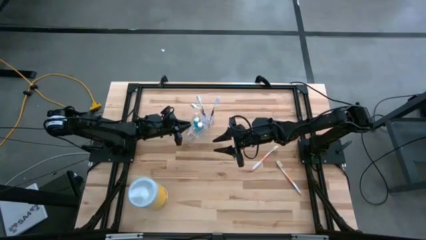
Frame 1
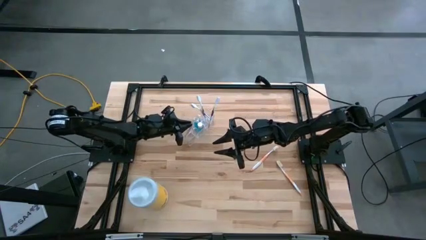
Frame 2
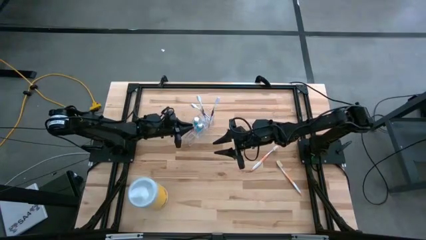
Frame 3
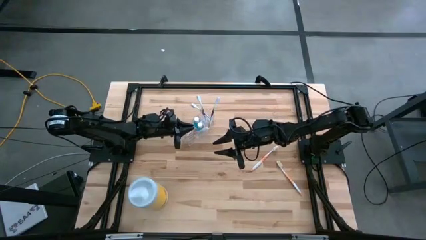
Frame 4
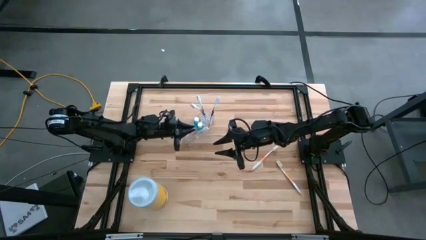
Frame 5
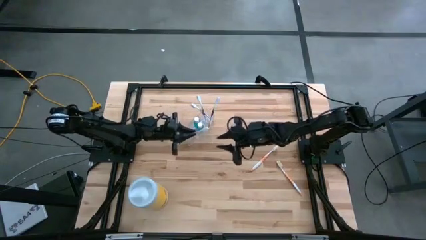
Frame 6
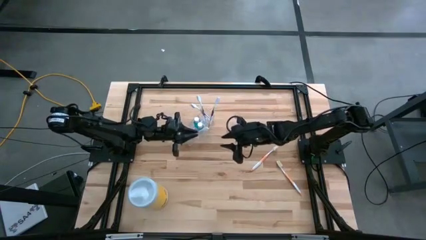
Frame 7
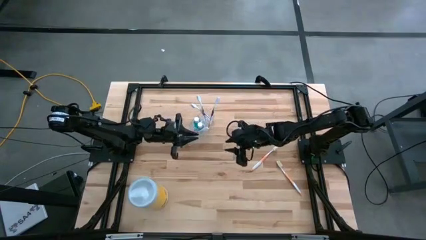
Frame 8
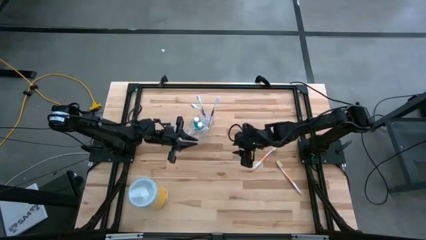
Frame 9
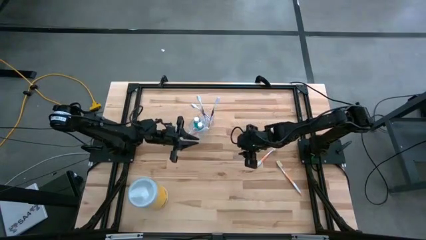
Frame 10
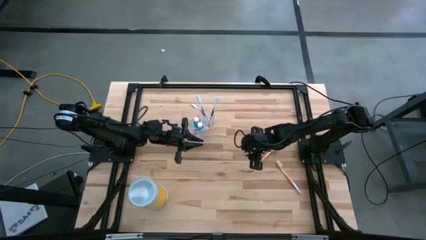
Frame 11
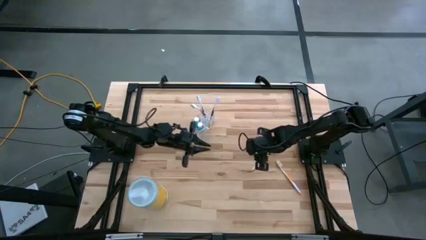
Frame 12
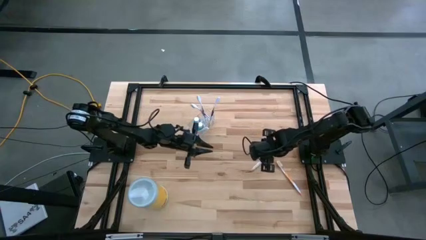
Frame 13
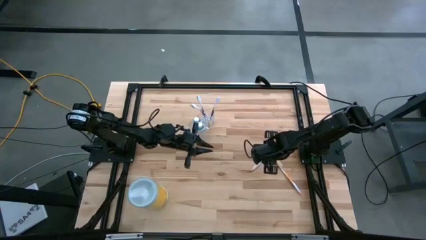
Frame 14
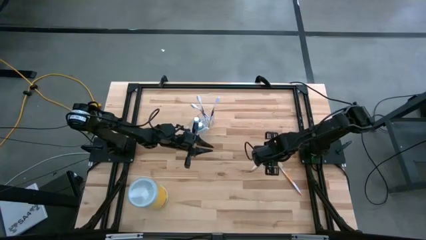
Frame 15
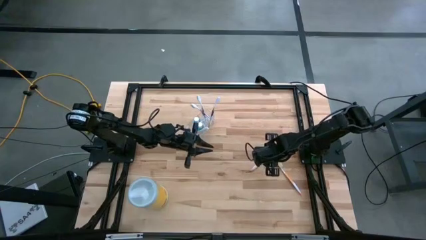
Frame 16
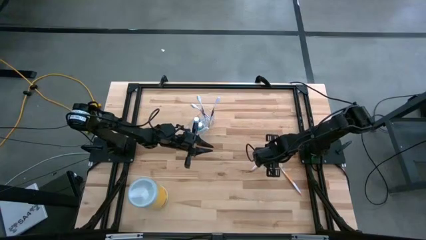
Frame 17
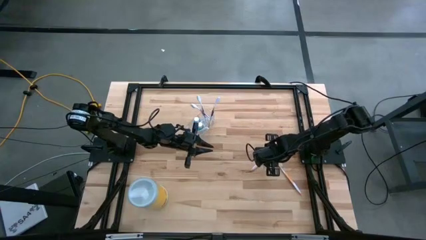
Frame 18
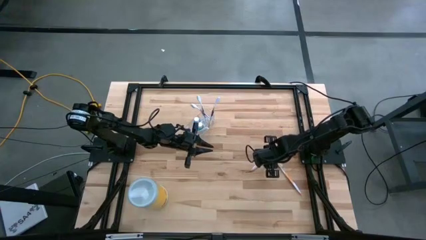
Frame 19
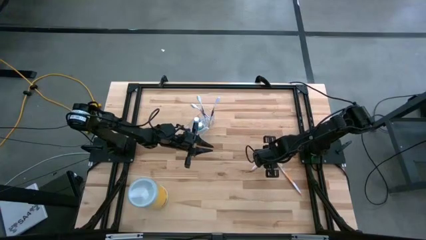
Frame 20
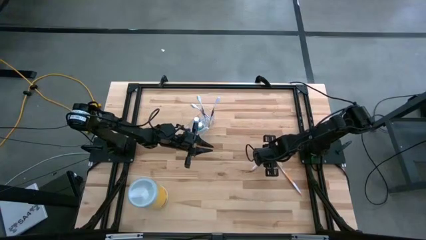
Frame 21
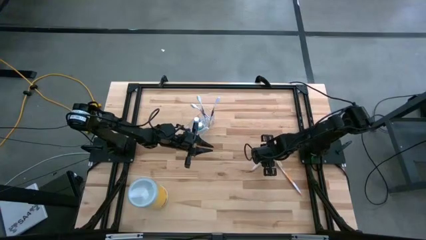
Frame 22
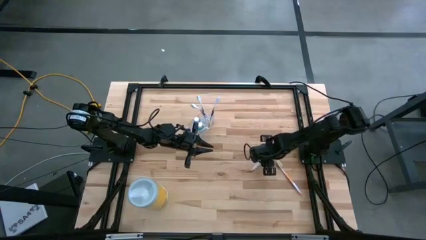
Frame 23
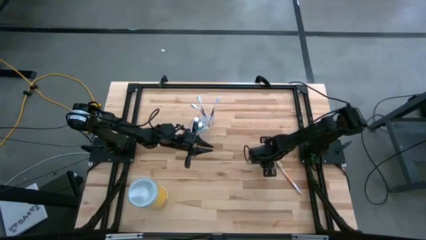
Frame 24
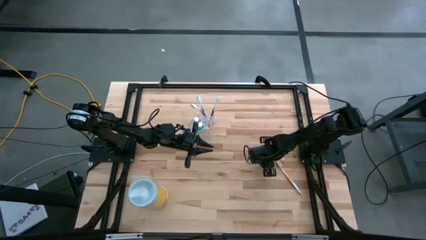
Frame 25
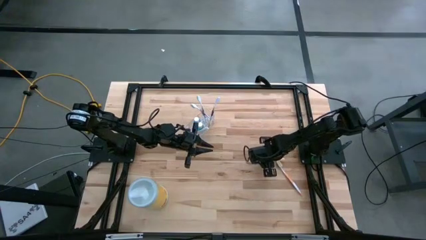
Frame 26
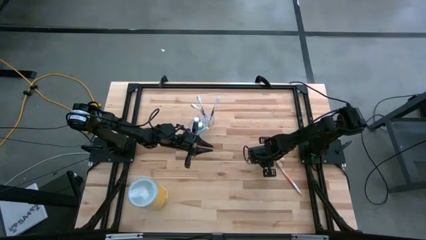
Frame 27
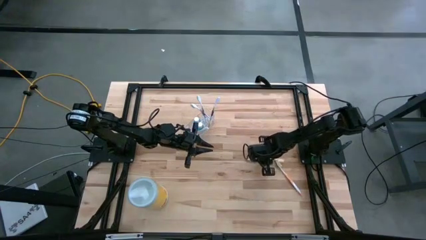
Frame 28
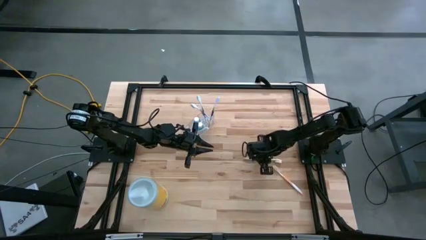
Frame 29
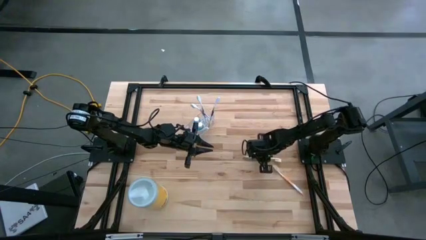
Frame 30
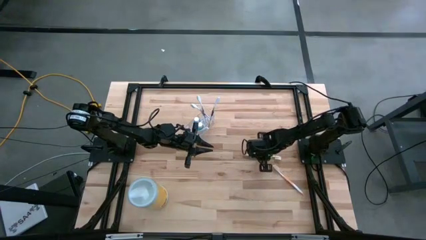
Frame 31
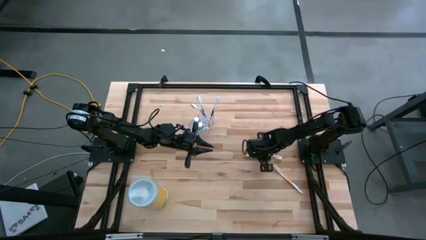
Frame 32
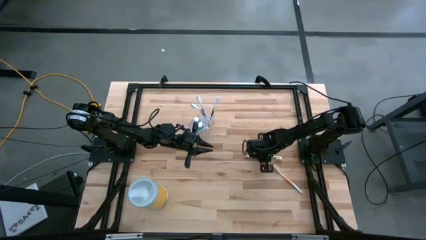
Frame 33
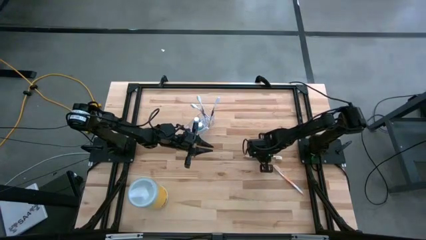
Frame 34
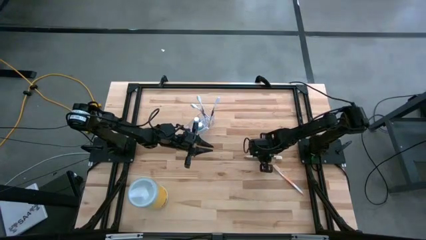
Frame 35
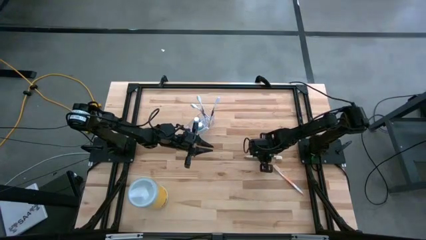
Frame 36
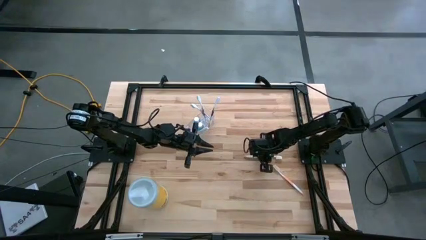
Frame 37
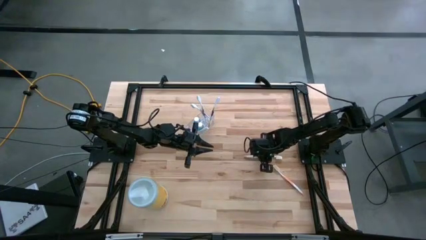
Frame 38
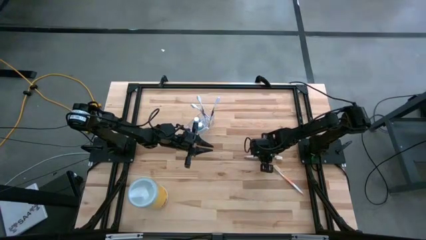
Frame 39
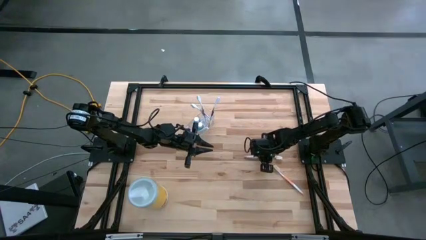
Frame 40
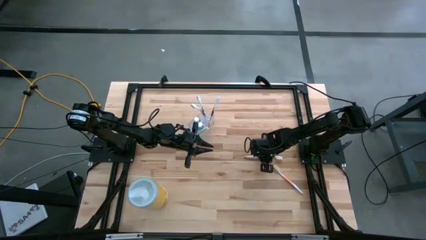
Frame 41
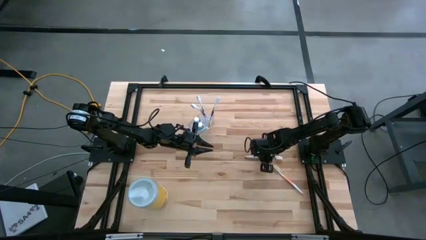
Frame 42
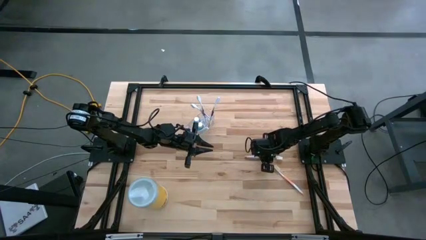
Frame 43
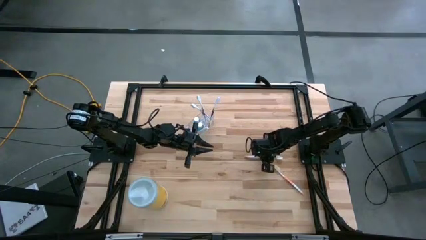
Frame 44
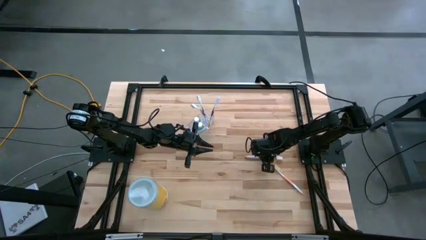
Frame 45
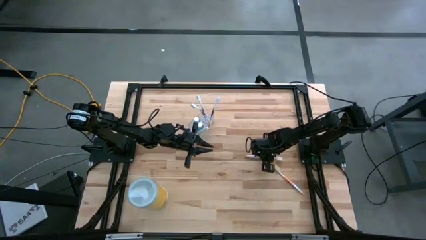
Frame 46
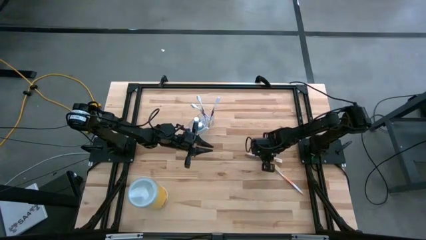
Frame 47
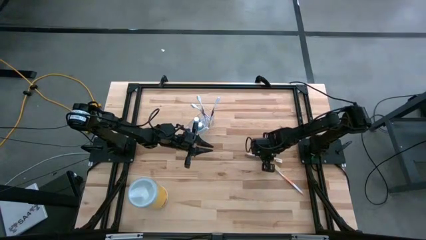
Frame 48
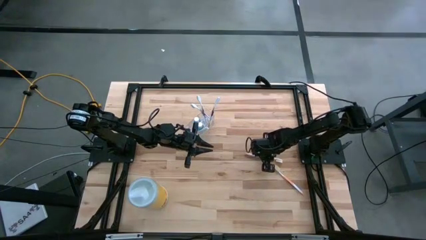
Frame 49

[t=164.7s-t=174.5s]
Task: Pick & Place toothbrushing station
Put the top orange toothbrush into the transparent organizer

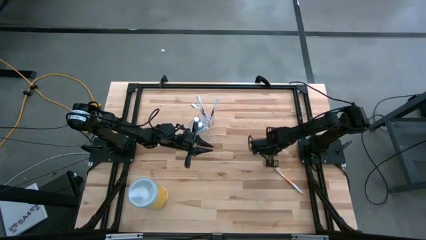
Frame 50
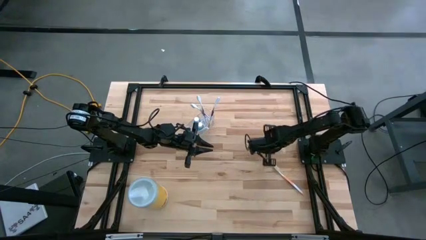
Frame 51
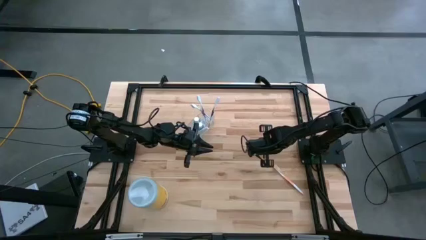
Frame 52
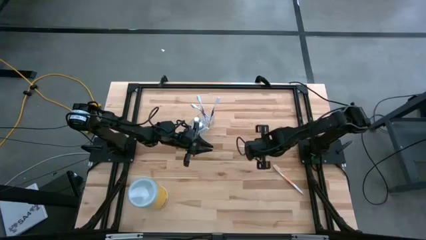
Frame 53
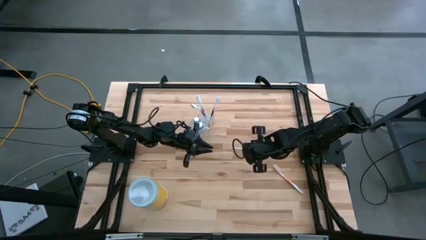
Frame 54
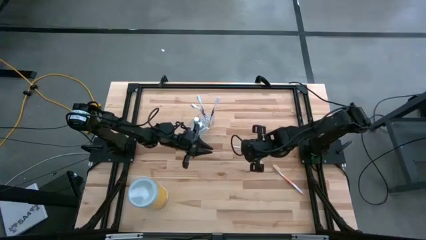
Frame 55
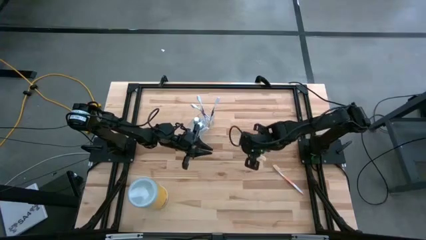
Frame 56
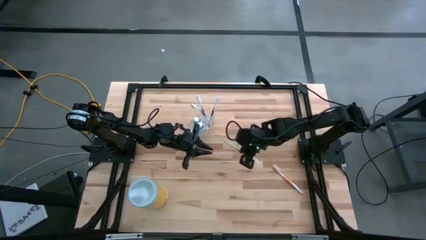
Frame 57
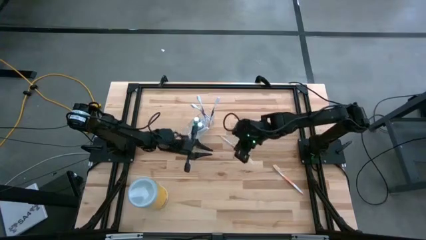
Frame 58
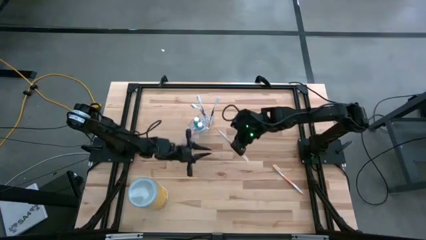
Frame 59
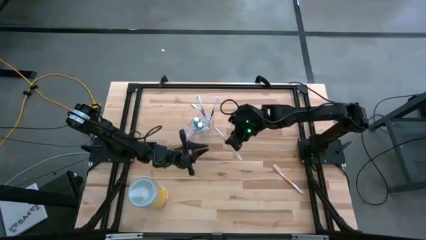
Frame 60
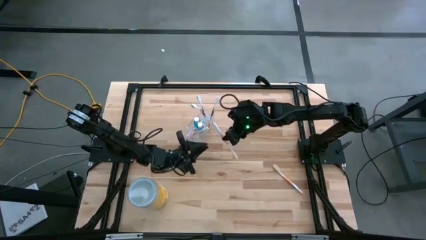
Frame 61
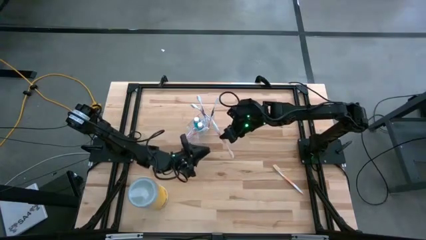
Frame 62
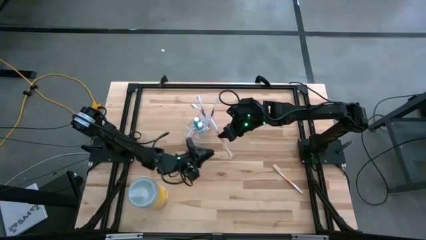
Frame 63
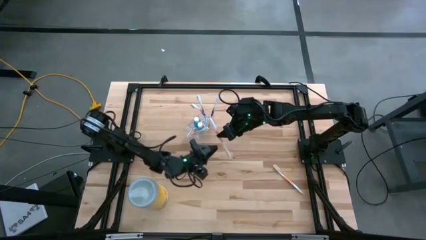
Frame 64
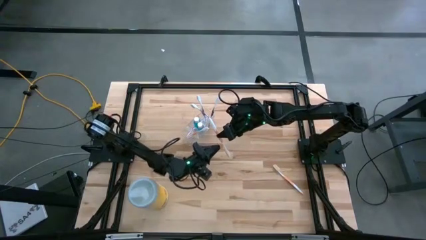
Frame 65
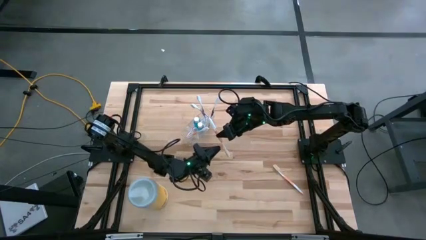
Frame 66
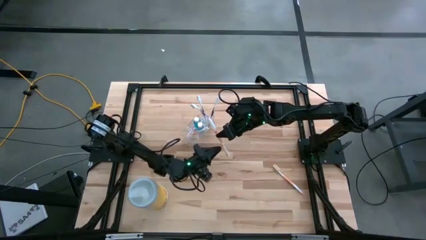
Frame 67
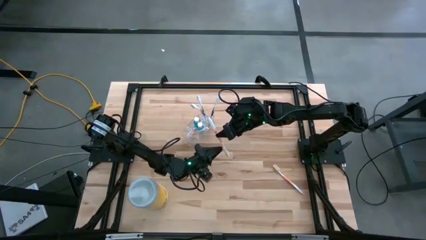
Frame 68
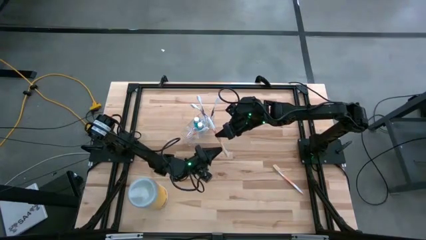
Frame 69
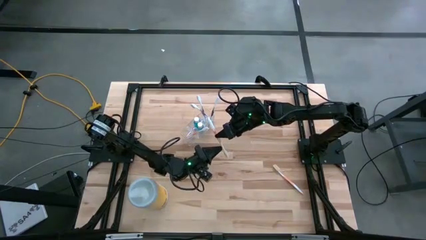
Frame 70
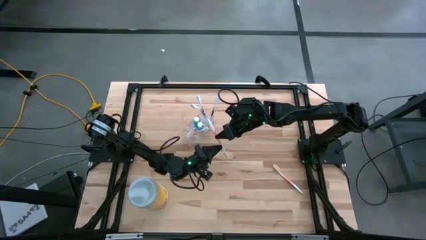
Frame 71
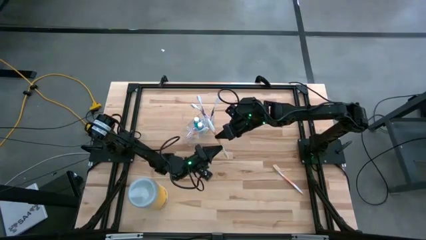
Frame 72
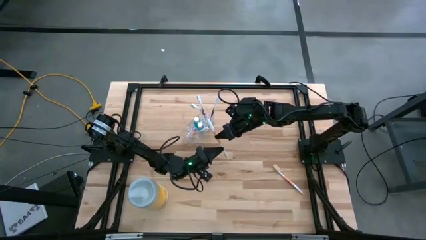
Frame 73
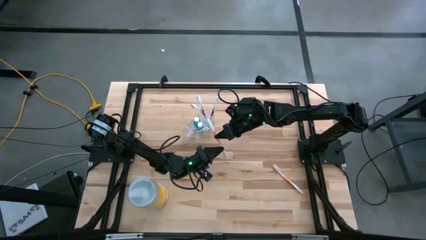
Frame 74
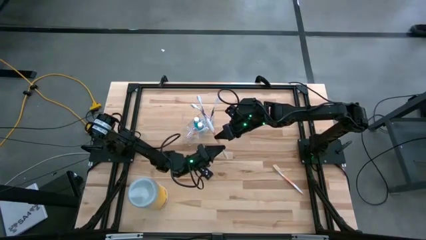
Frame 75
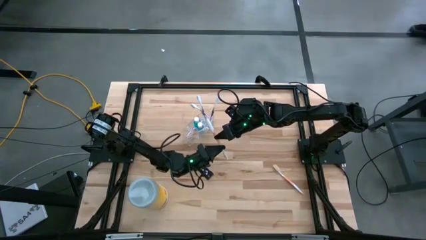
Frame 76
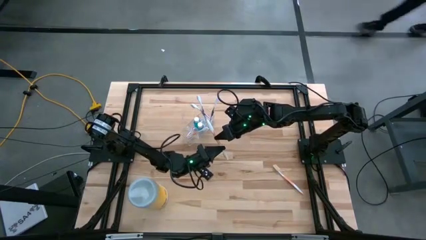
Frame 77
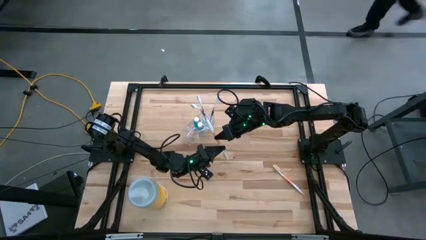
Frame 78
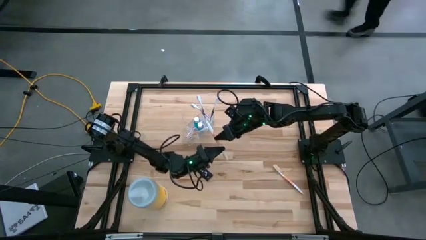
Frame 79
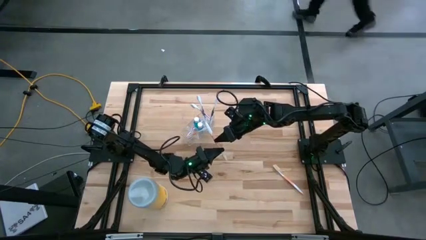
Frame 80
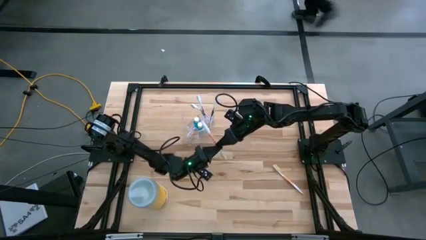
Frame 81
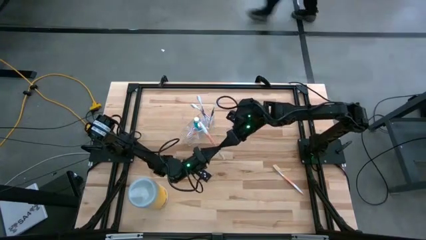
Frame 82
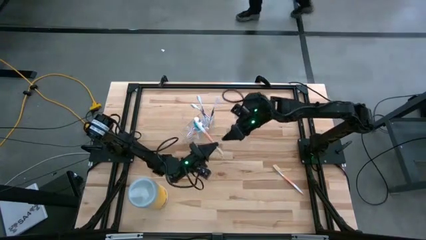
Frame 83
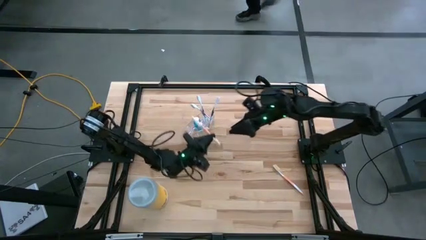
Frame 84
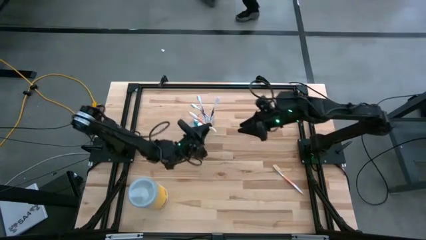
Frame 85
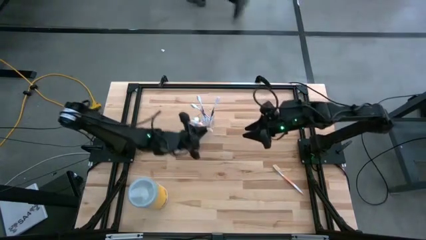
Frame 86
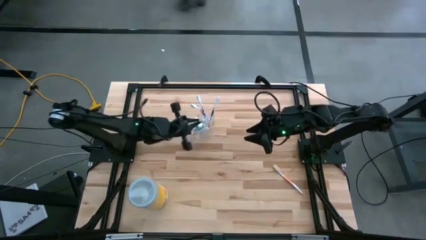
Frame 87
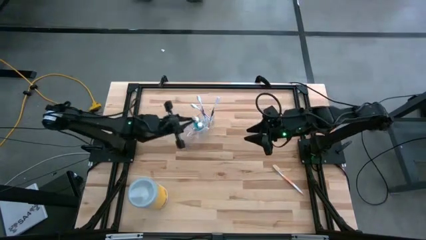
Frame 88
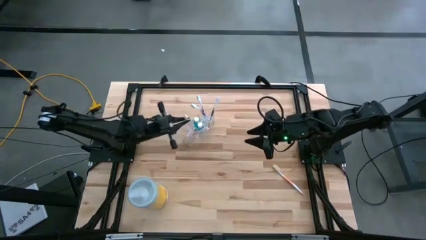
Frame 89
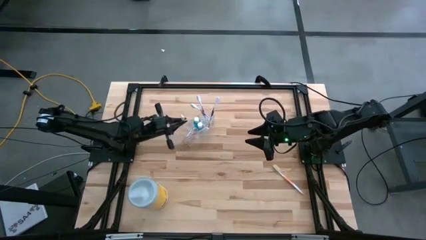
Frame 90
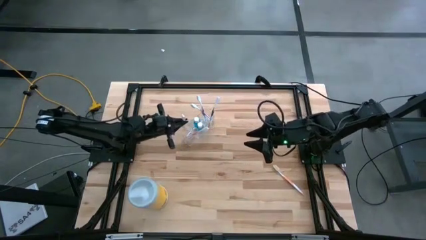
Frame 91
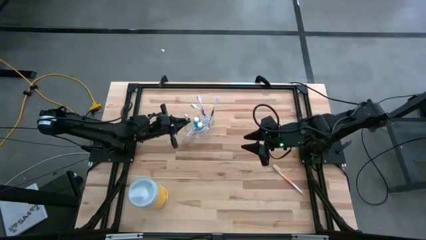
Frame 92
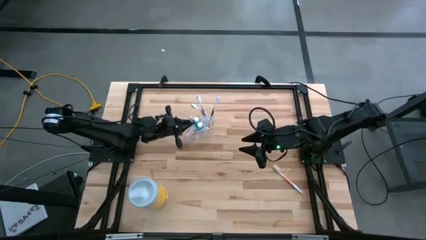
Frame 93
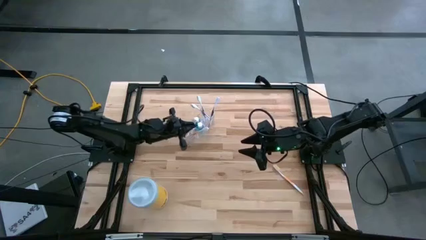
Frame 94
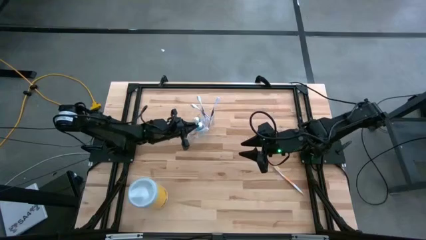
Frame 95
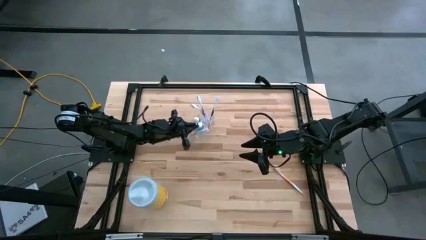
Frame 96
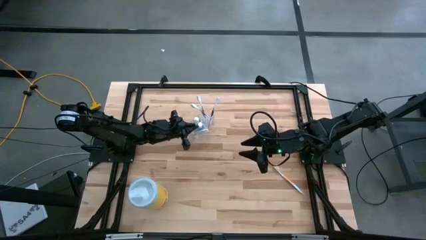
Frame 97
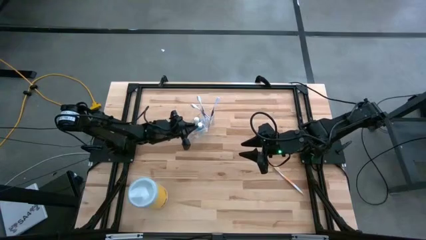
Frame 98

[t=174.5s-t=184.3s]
Put the top orange toothbrush into the transparent organizer
